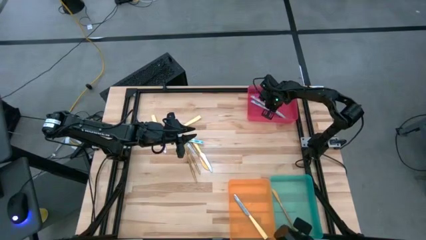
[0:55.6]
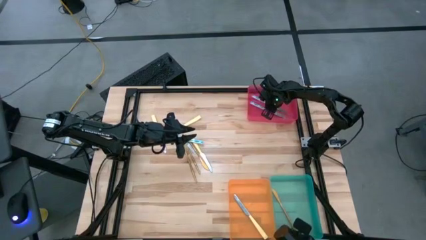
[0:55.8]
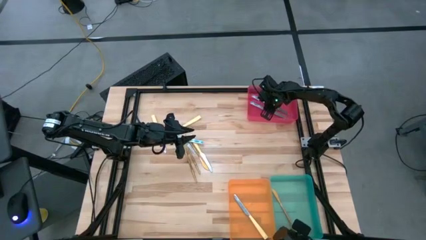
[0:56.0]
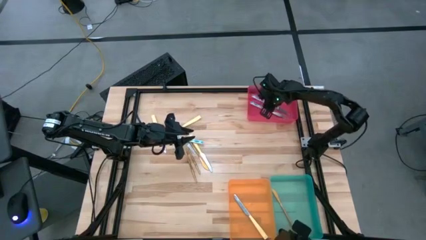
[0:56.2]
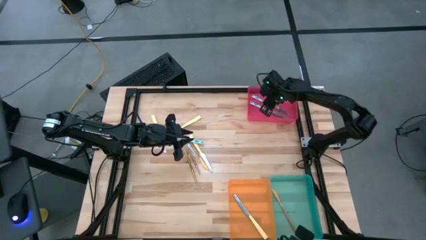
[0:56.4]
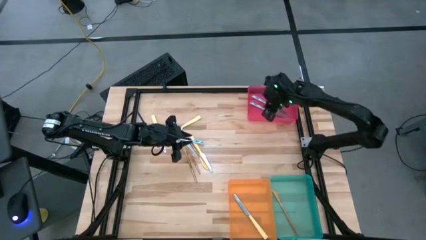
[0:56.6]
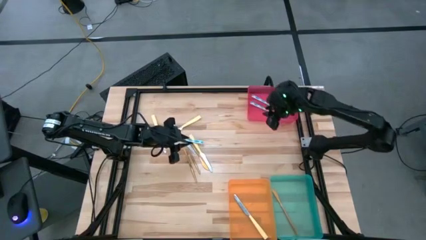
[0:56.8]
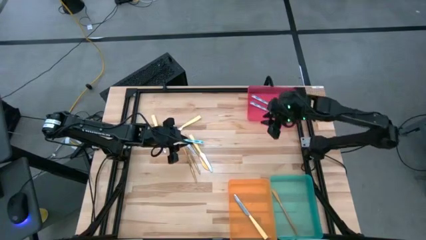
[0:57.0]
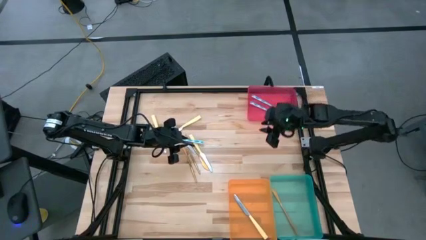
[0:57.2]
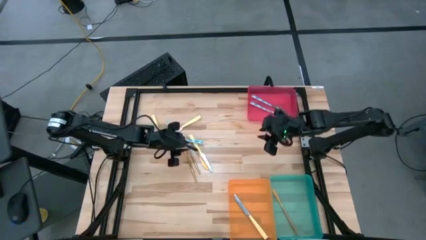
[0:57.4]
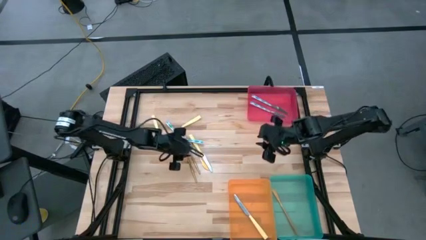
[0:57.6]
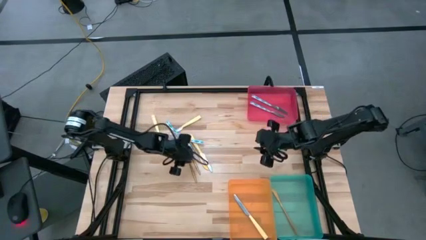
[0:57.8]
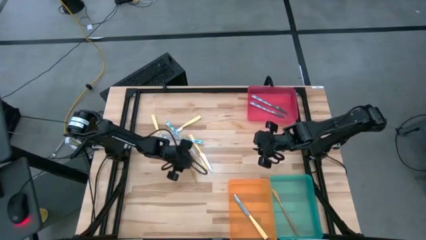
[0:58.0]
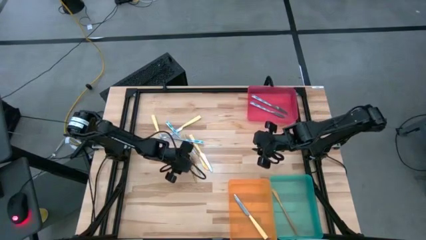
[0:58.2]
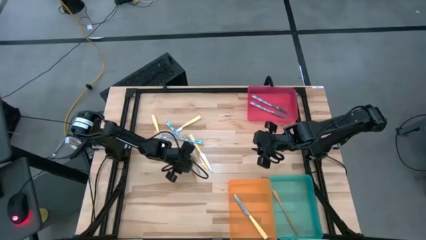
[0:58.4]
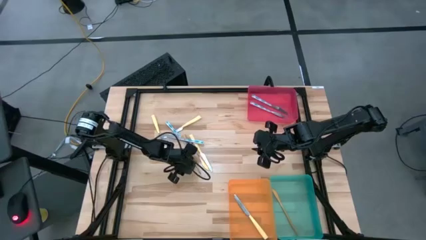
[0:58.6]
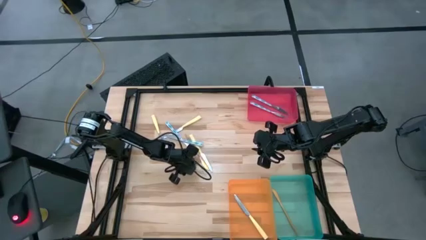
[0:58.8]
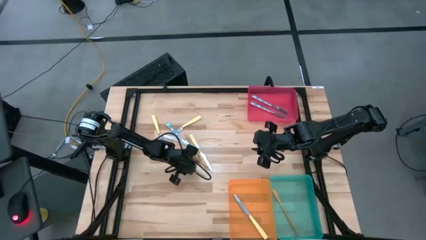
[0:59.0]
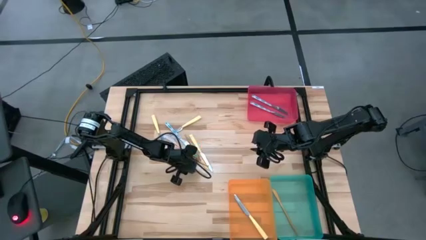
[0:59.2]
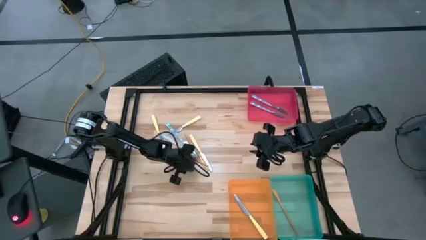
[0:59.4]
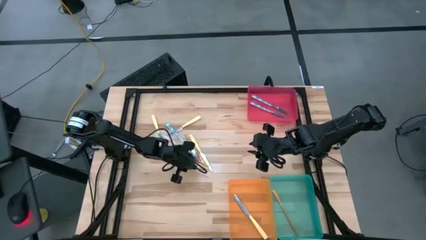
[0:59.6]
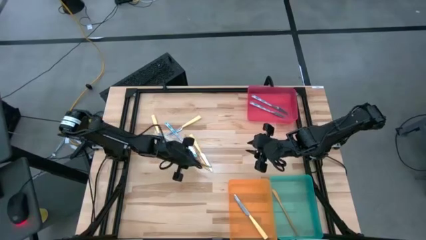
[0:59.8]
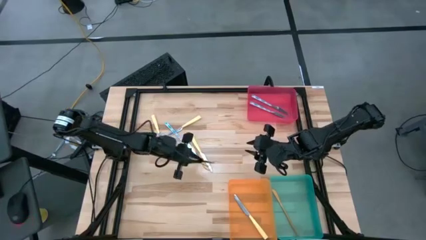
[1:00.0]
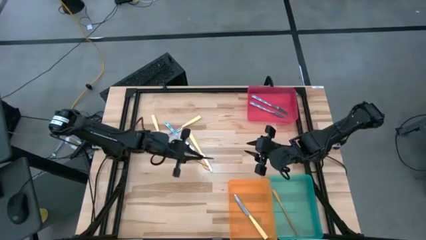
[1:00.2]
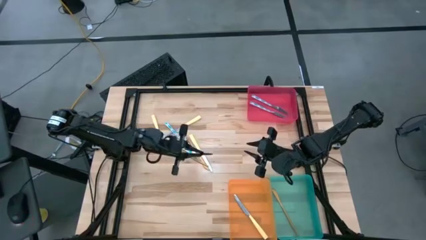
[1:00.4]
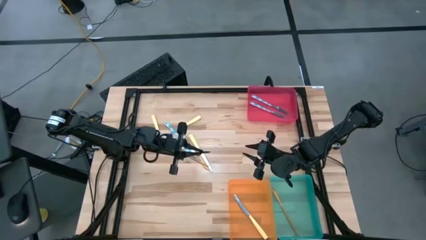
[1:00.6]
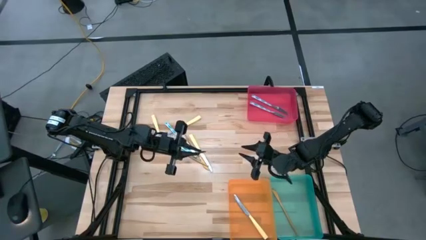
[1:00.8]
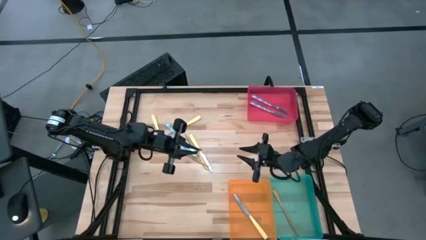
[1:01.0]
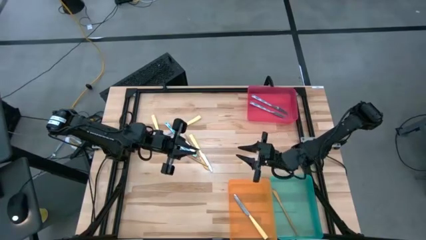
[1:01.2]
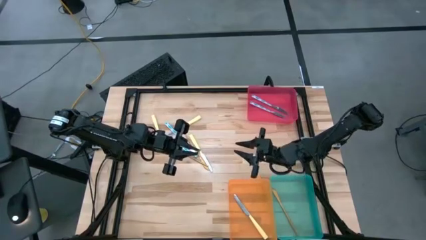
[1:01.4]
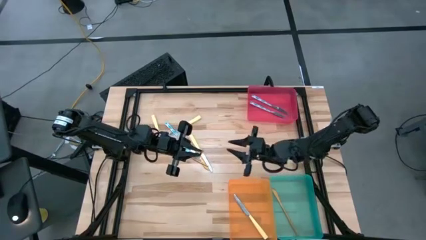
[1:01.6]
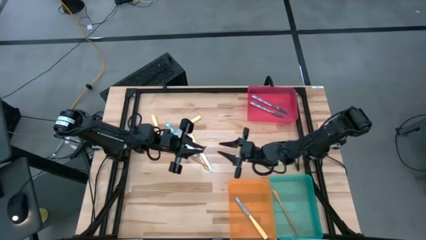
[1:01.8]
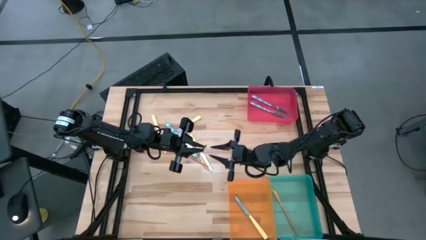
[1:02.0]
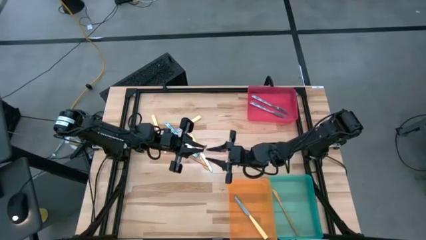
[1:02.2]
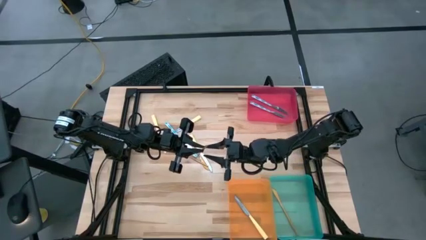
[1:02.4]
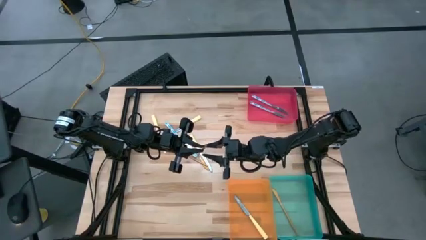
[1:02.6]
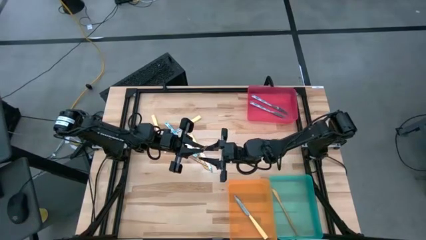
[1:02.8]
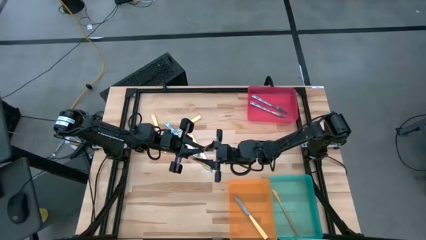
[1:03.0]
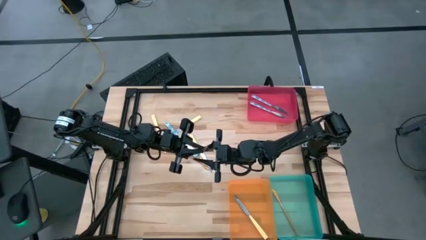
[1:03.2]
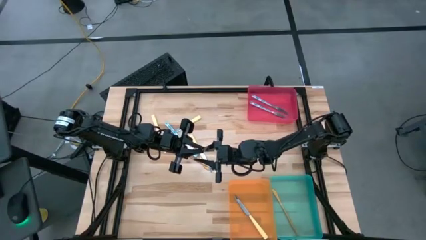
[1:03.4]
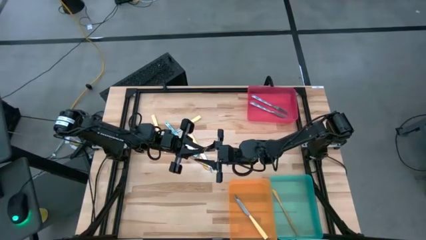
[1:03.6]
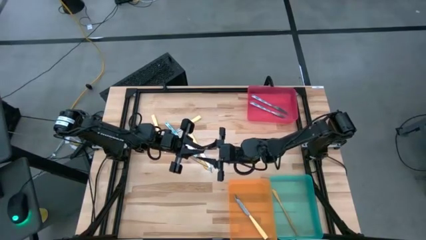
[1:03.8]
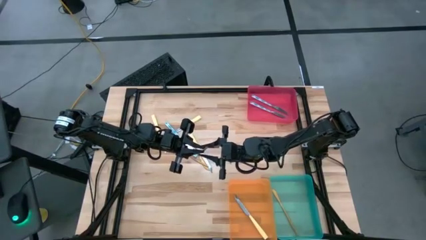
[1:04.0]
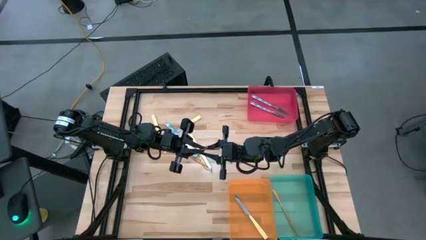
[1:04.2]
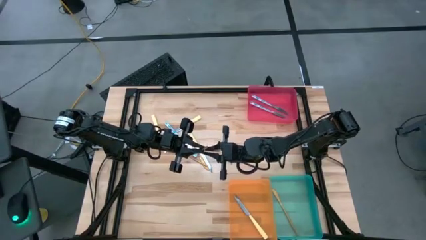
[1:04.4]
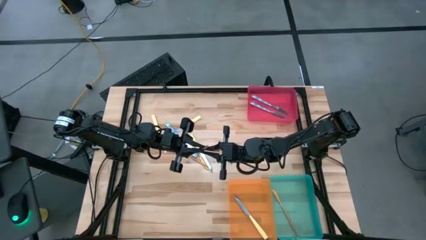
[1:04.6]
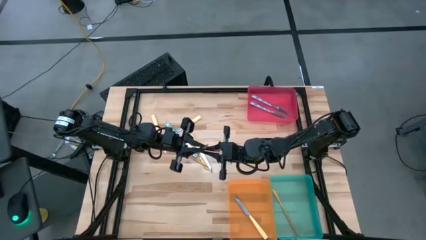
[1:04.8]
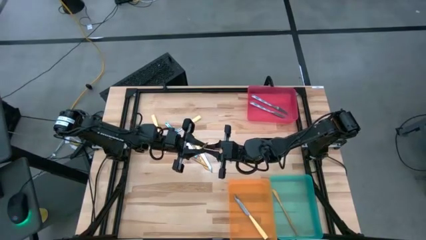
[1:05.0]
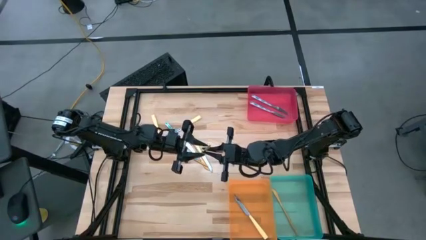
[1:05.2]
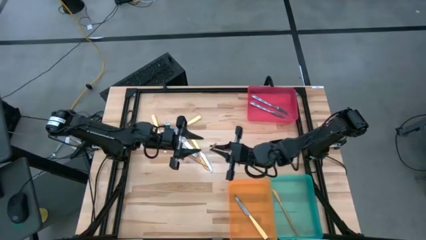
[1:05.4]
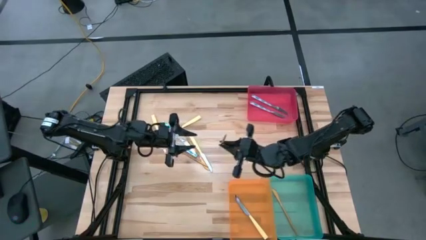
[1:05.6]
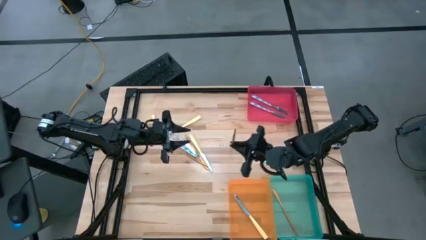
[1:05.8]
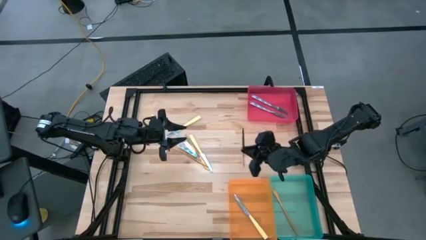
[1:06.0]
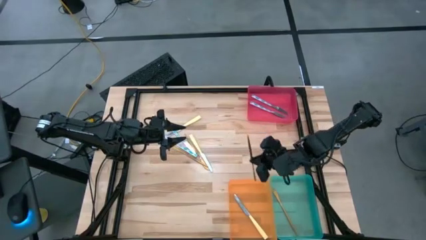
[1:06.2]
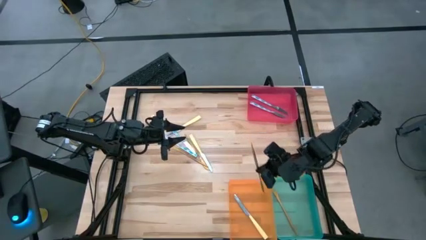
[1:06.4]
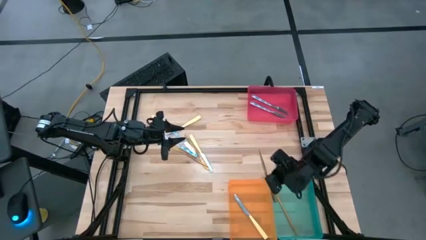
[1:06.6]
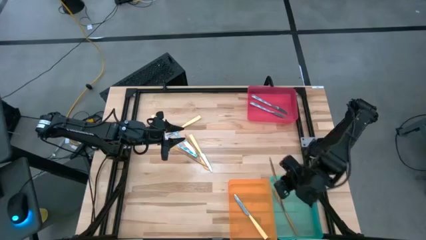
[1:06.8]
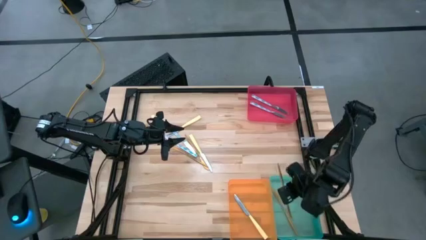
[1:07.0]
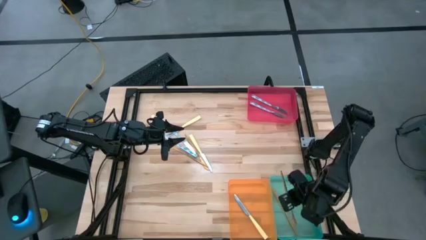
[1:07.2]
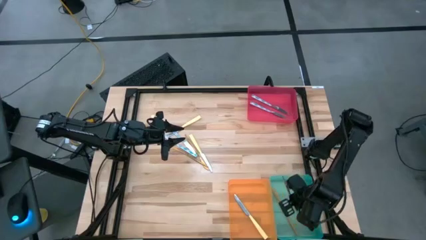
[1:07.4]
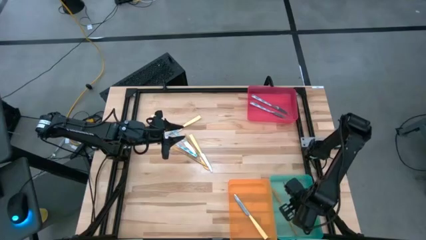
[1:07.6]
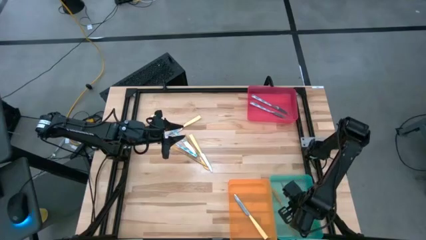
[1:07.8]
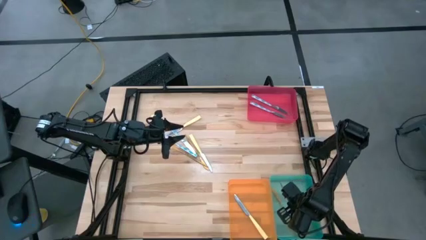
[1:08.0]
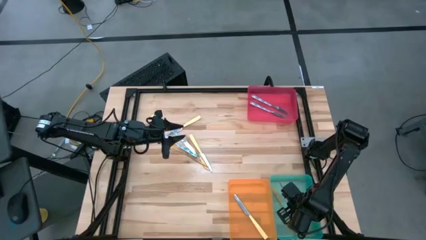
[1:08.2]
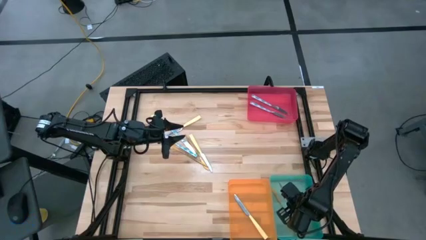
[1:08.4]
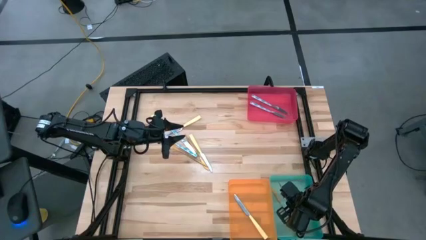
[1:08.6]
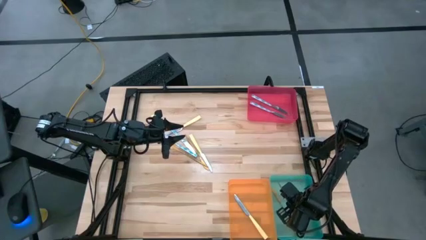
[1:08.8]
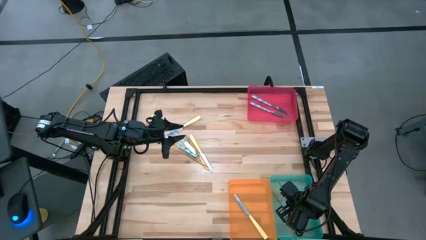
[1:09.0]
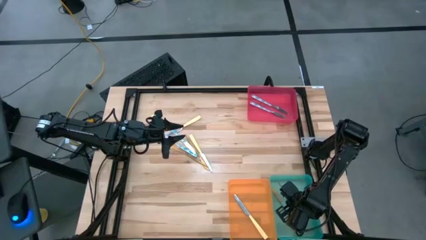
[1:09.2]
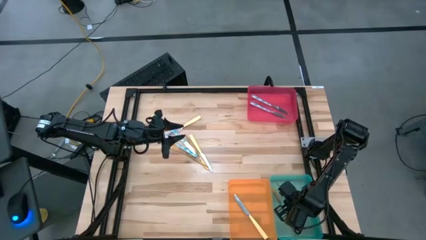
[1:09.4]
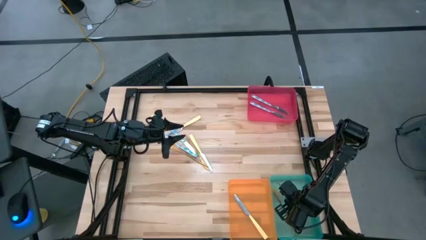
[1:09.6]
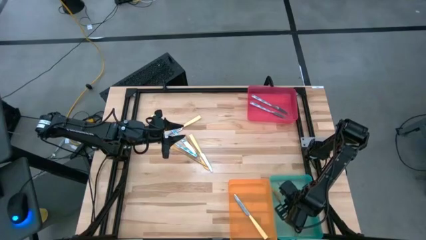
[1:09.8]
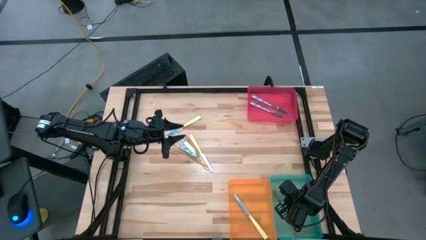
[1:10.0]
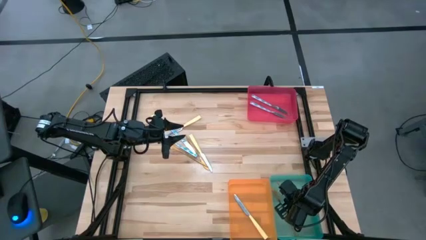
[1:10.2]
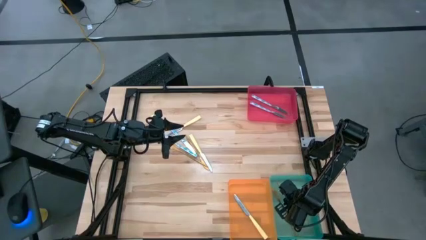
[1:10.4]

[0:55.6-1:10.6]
Task: Sort silverware by color (type)
Put the gold knife into the blue bin
